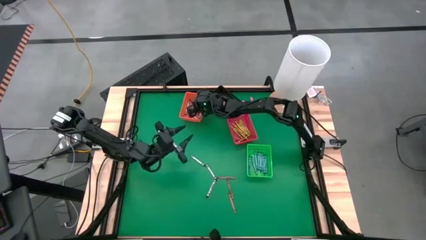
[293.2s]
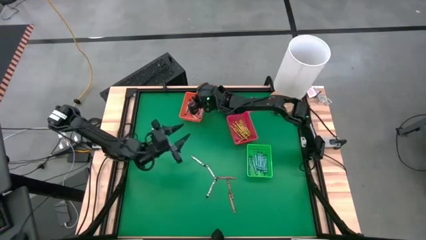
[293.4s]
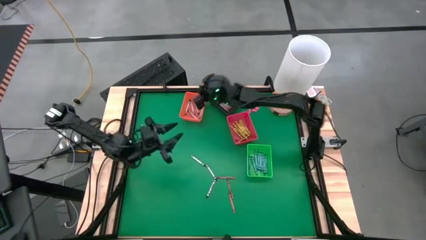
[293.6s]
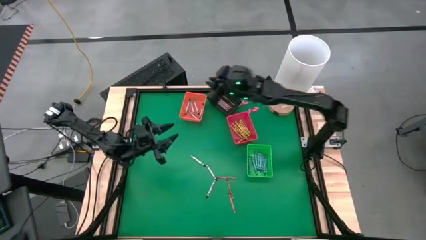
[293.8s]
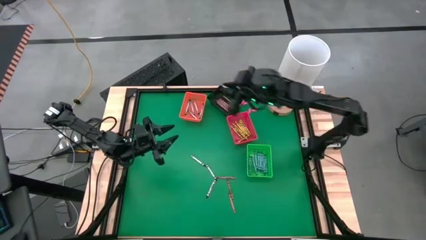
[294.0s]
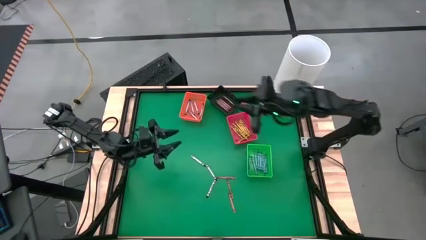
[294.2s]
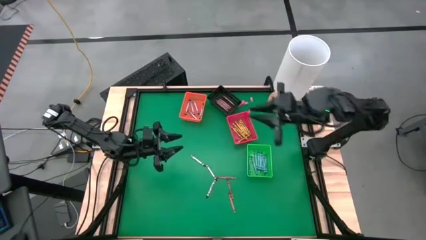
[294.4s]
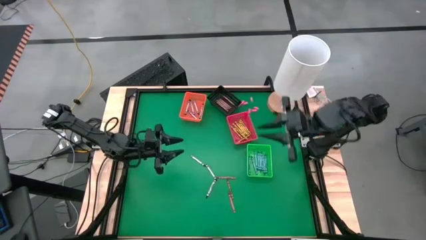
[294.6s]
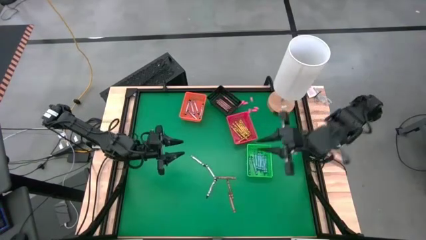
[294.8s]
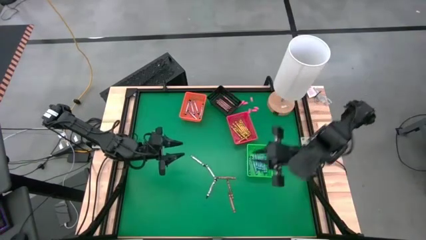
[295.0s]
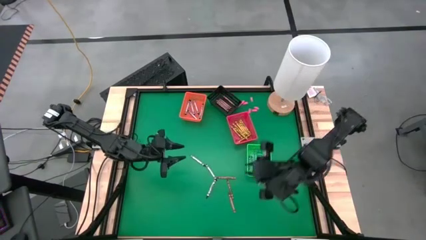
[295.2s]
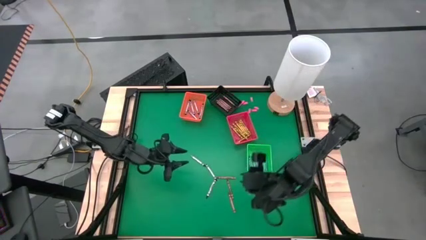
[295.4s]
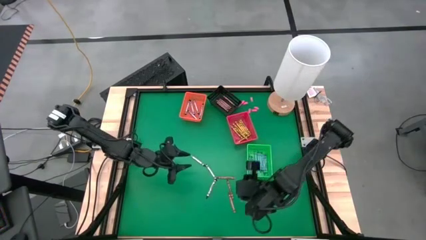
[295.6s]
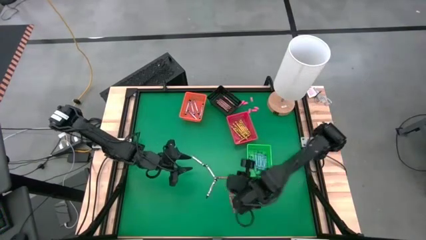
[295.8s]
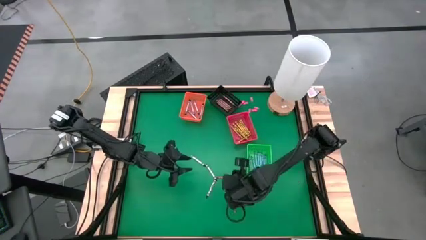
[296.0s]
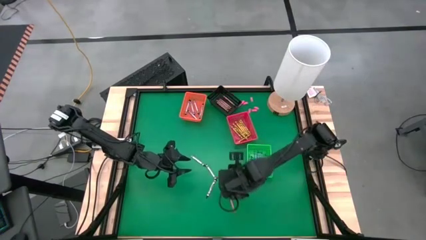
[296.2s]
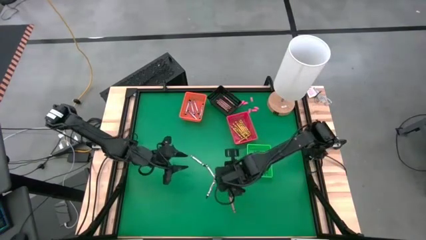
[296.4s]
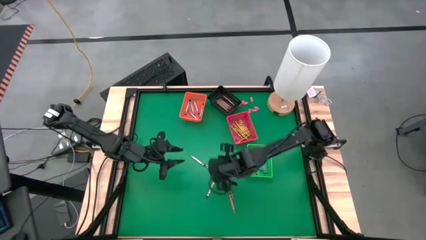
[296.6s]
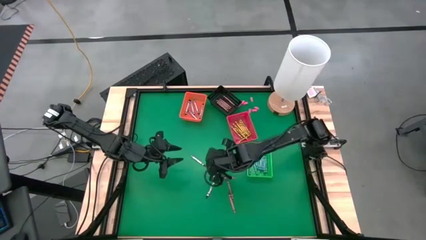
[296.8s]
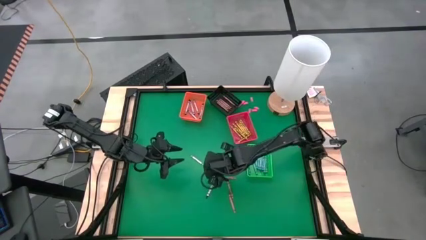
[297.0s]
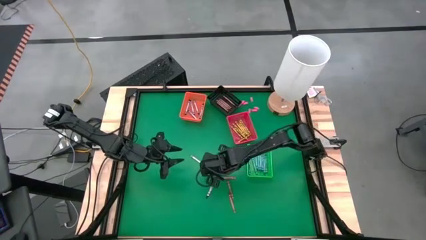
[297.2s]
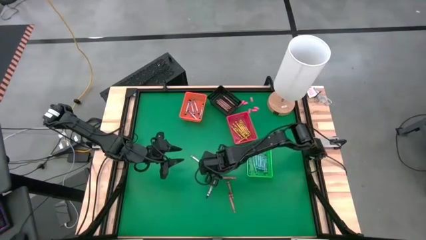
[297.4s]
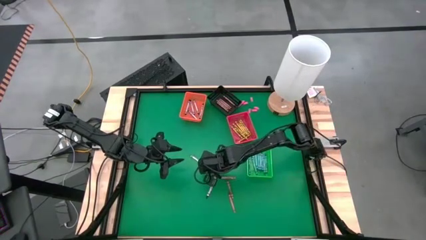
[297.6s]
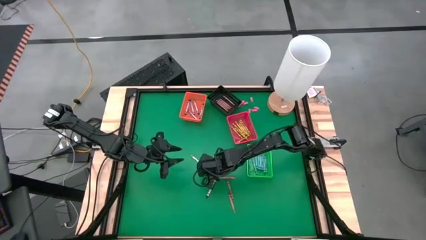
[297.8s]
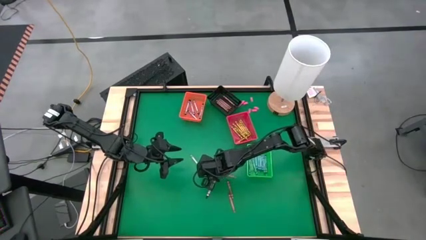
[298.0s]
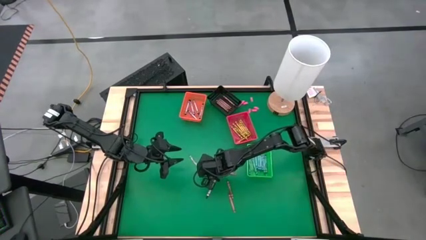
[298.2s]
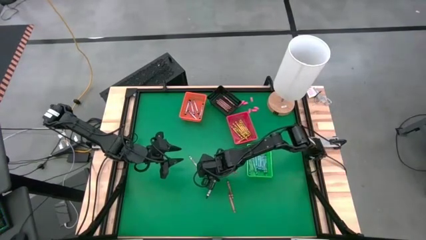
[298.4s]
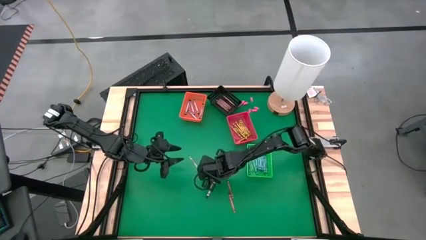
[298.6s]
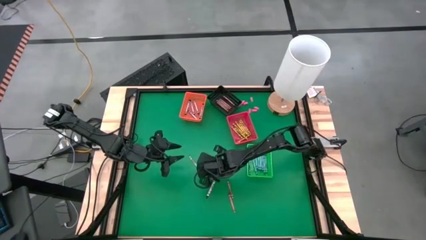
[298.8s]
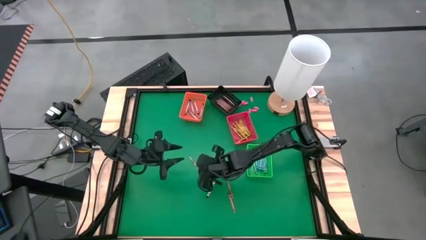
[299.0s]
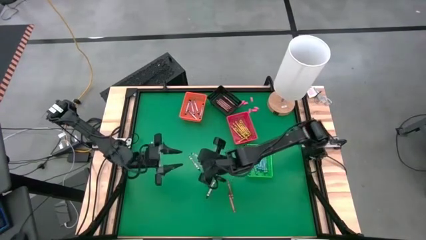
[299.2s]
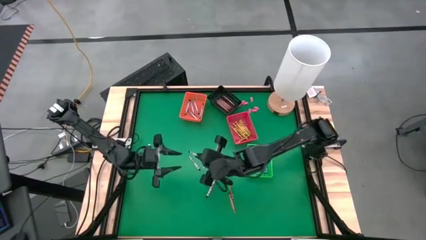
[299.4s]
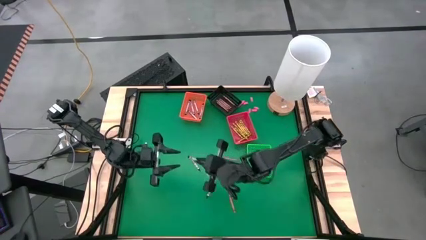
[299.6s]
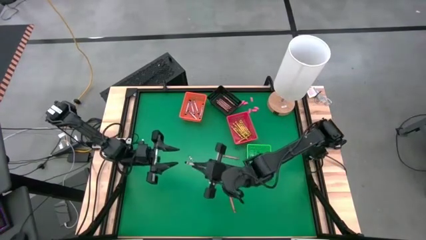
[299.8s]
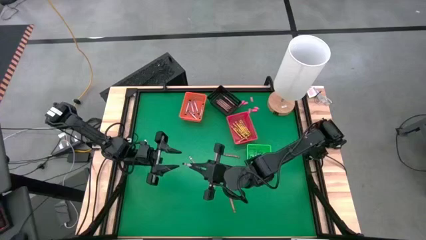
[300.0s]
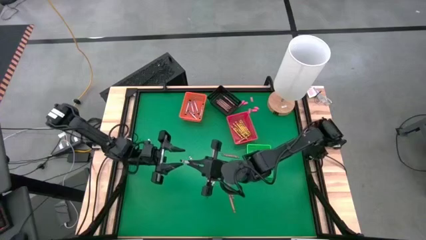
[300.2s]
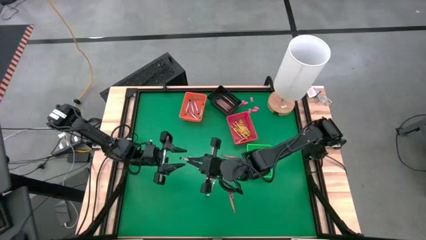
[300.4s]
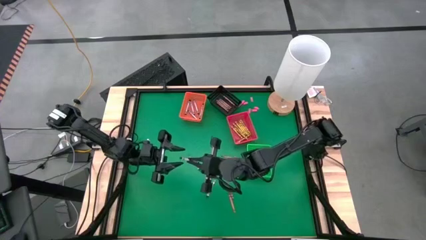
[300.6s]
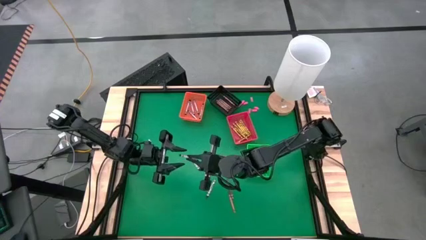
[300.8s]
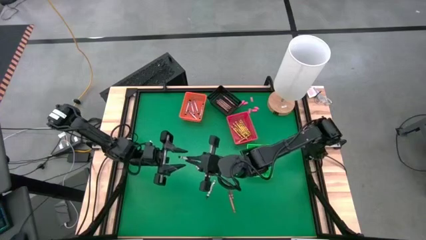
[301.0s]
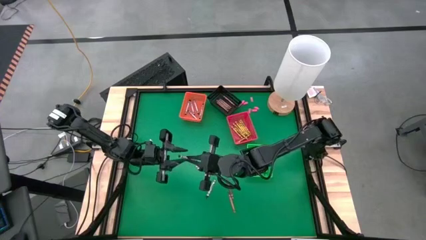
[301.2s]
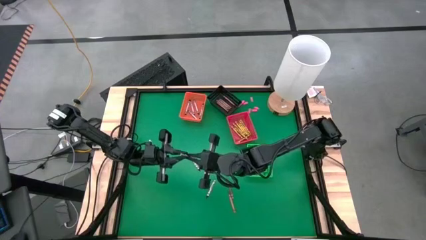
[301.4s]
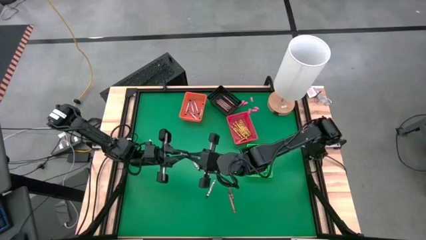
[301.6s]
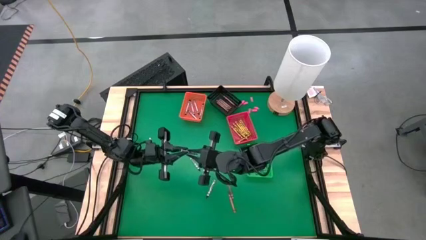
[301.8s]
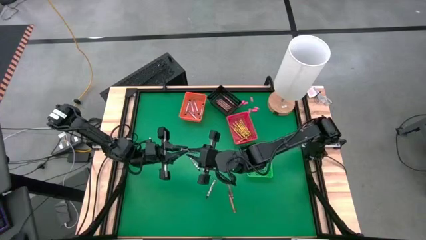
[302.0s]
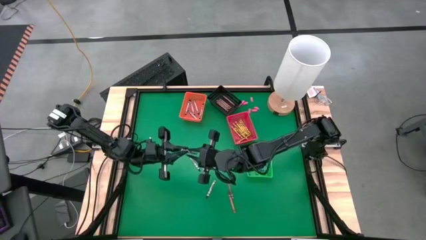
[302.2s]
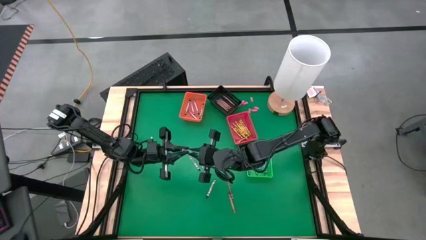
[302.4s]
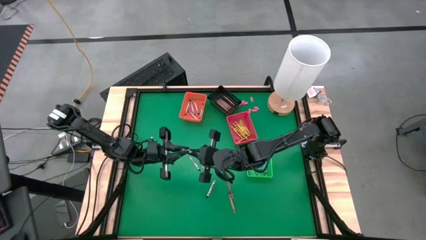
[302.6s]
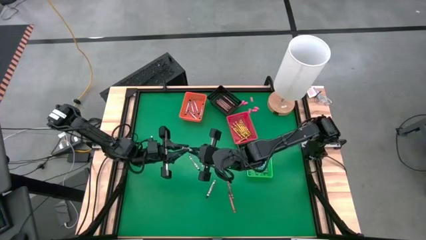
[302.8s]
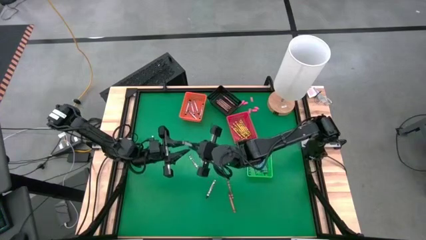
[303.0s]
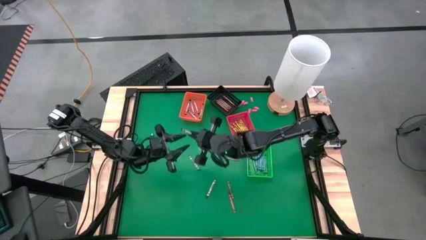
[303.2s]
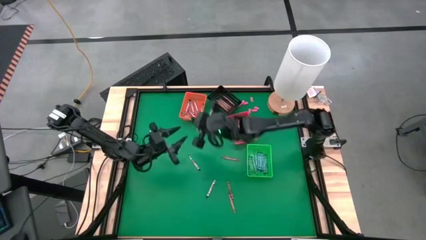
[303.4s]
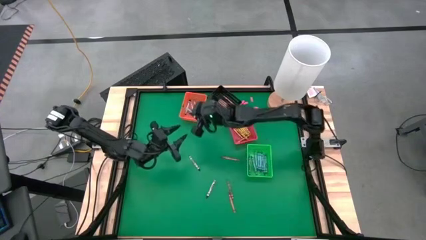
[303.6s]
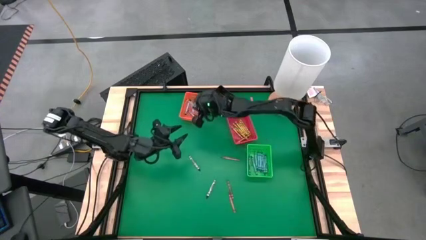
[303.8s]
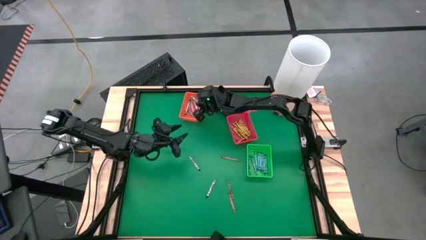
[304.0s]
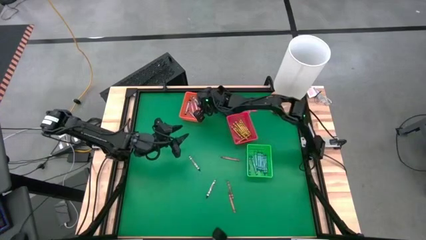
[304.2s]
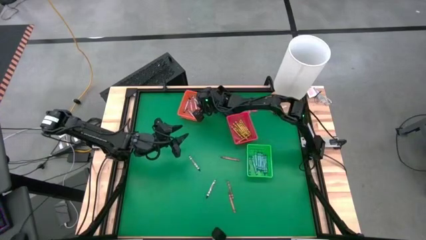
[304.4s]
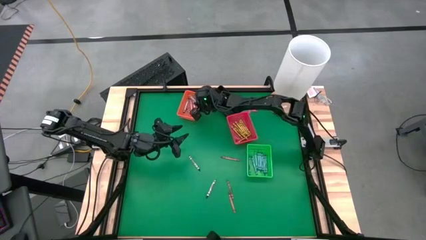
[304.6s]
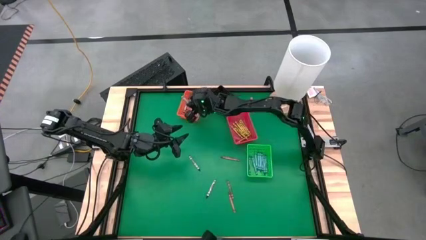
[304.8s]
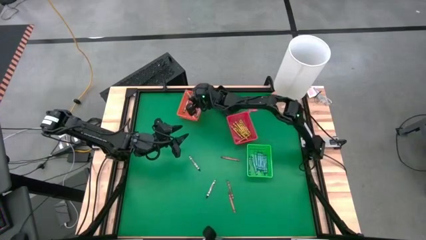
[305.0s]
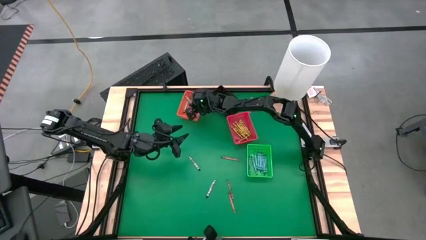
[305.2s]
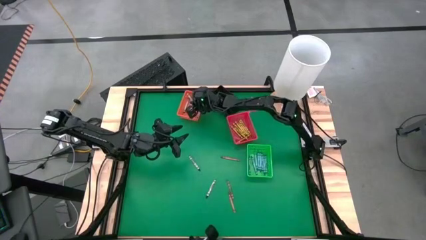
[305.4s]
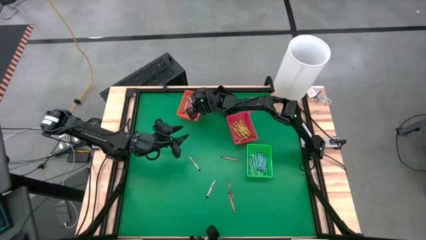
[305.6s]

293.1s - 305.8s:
Task: Sort crayons
Put the black crayon into the orange bin

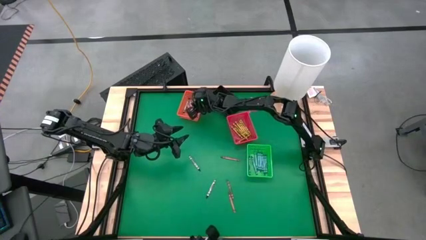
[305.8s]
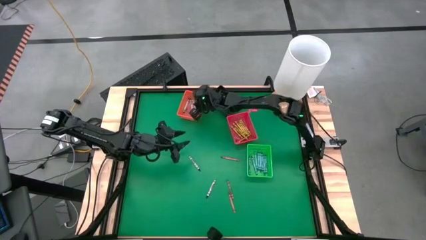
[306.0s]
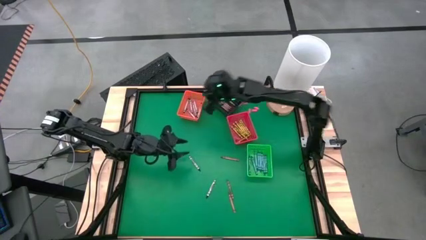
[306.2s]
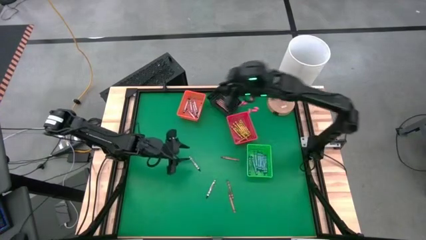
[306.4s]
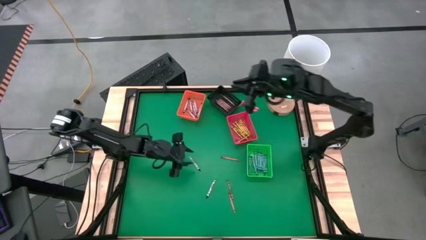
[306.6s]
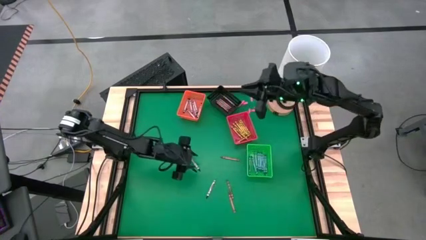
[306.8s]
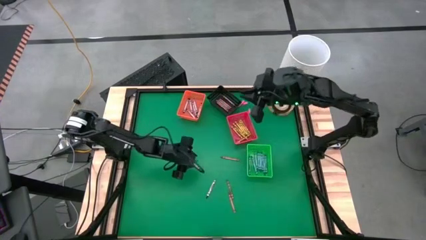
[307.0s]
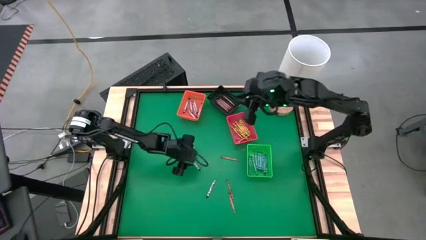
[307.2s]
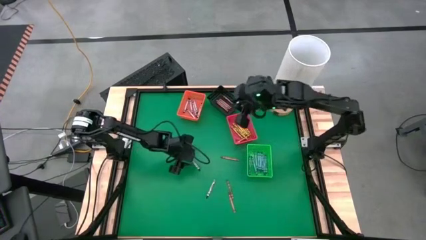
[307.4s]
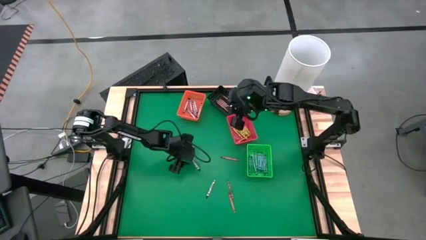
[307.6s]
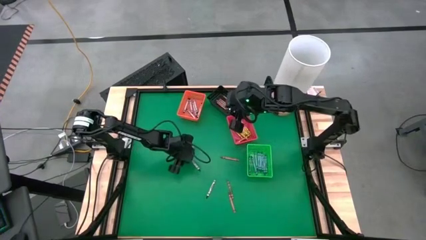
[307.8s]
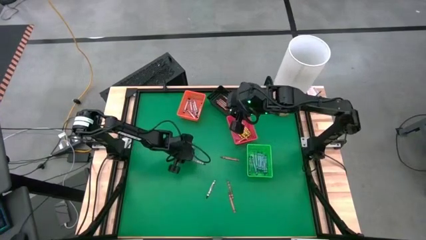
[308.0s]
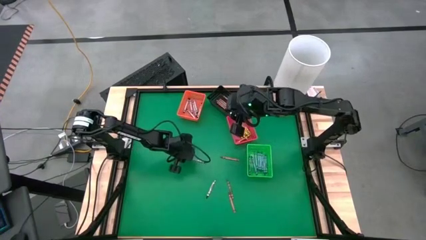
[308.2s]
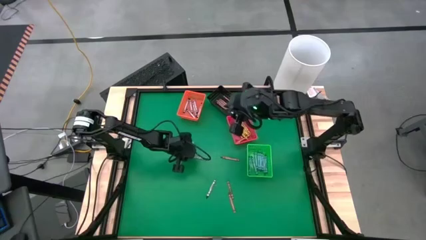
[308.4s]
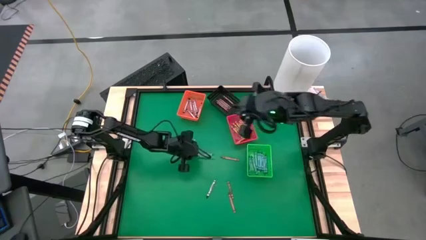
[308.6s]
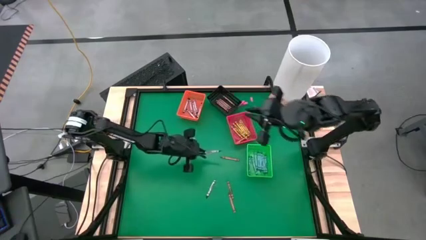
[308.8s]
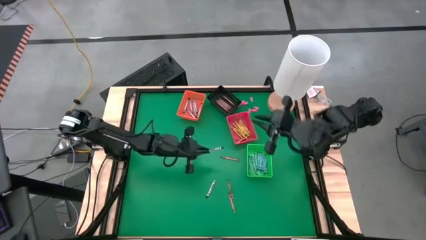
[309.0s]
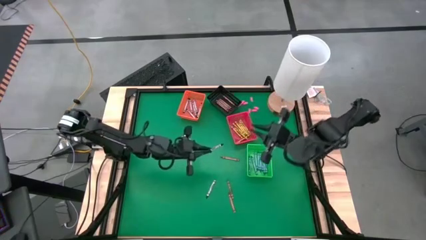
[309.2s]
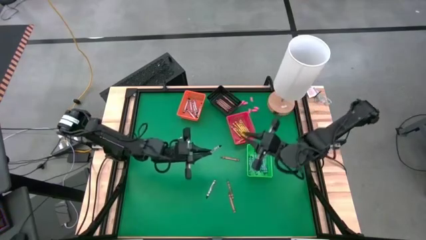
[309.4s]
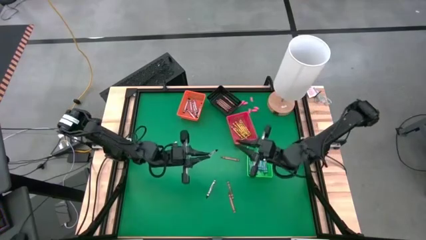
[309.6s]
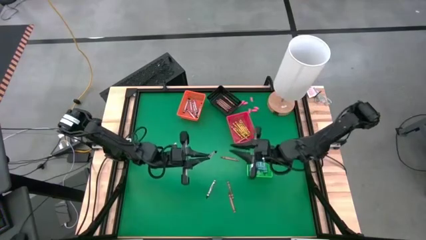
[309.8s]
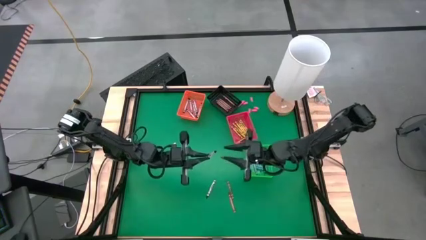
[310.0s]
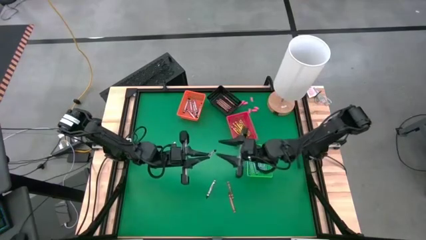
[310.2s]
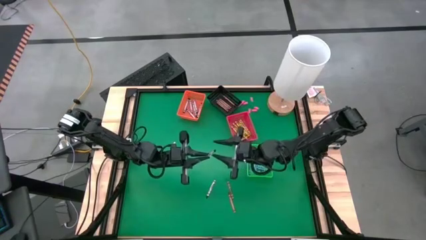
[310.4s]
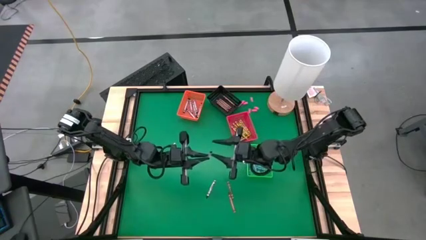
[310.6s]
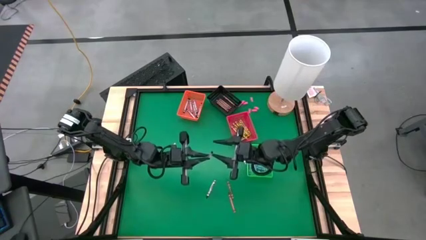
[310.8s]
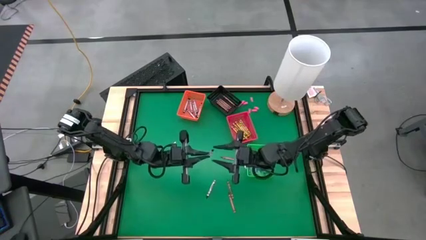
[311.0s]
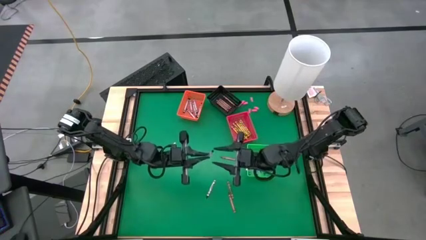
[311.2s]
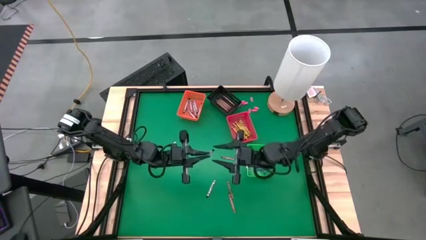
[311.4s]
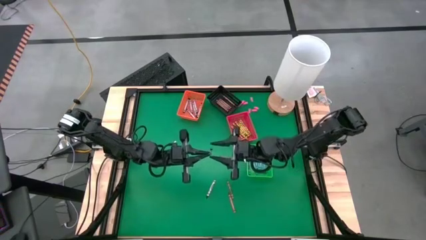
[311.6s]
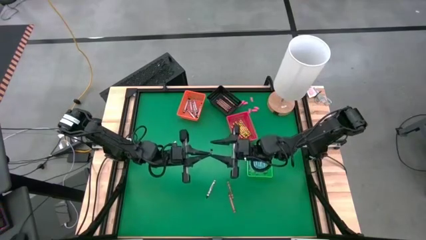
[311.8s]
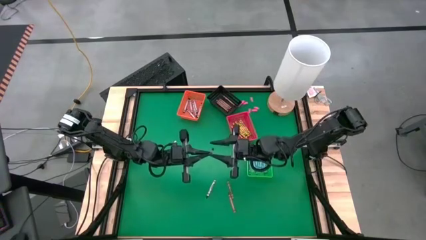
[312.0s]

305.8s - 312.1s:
Put the black crayon into the orange bin
